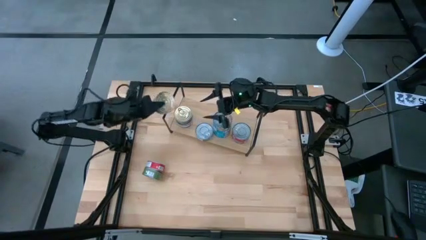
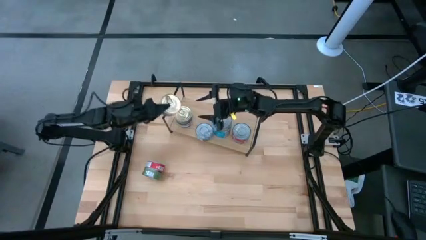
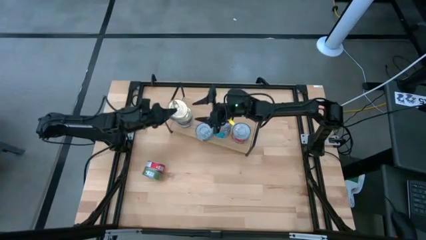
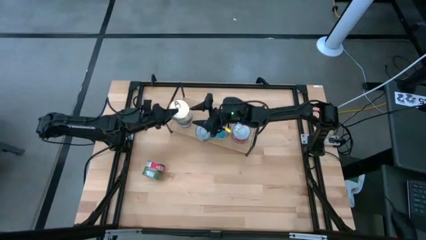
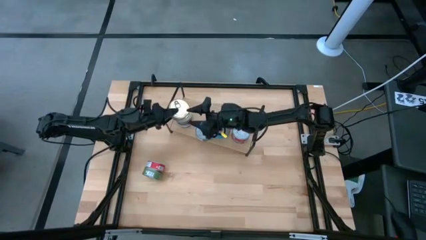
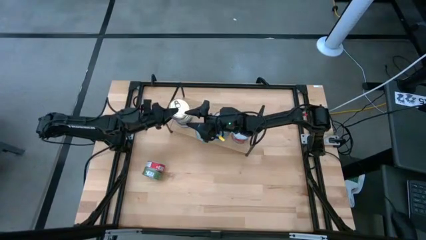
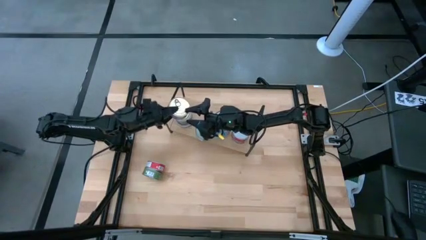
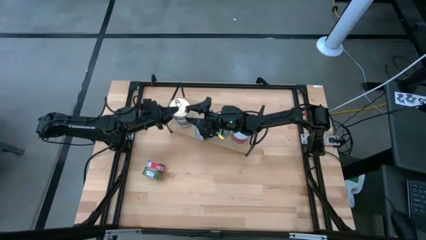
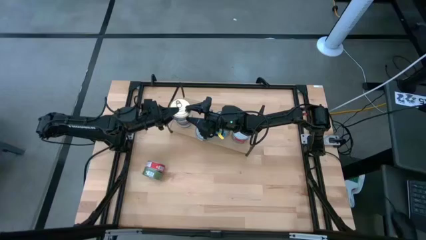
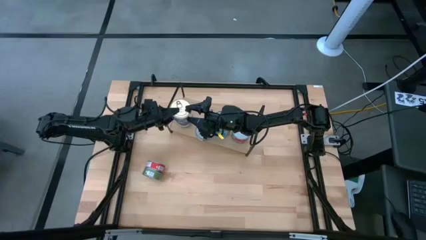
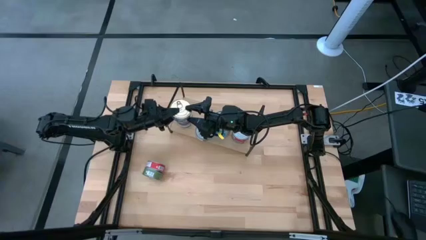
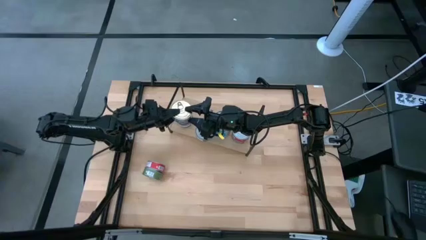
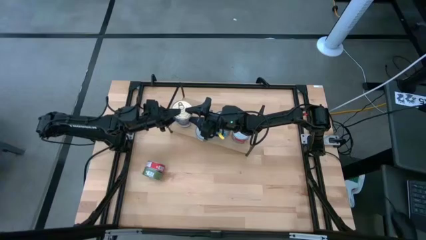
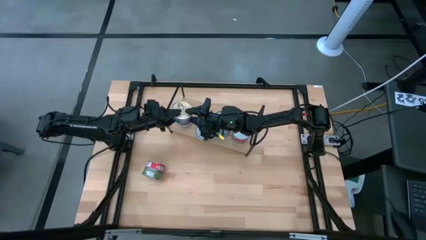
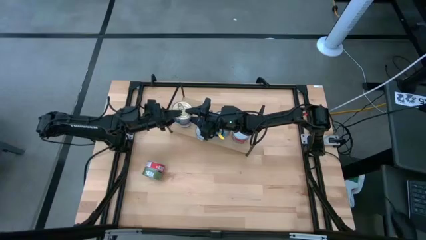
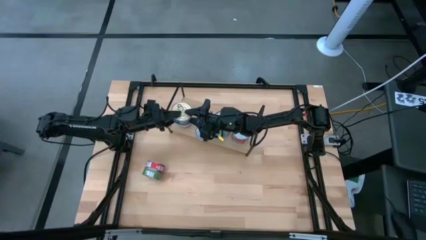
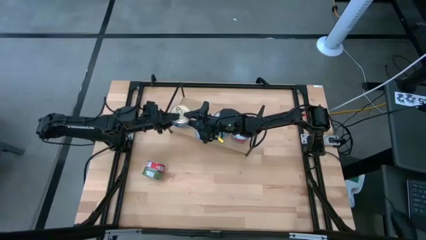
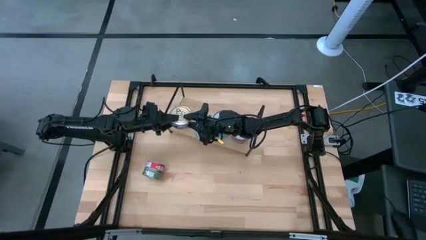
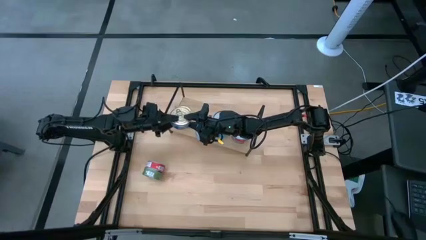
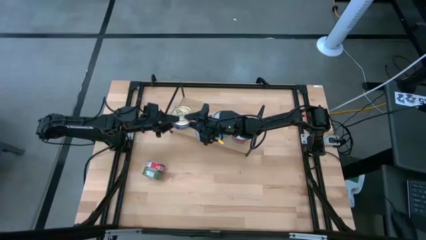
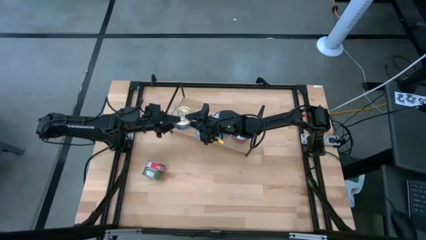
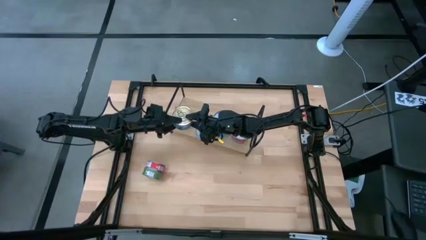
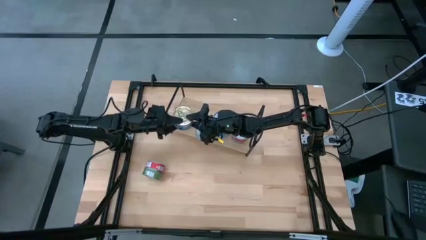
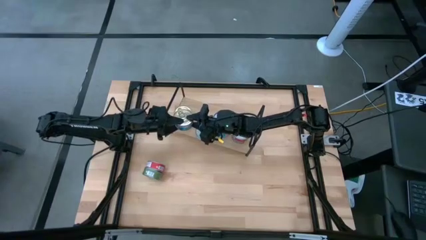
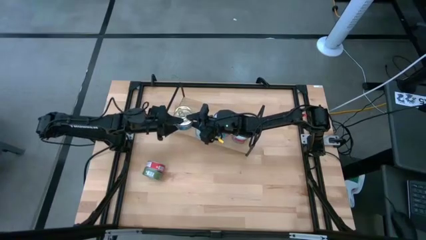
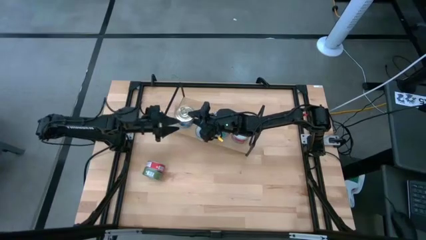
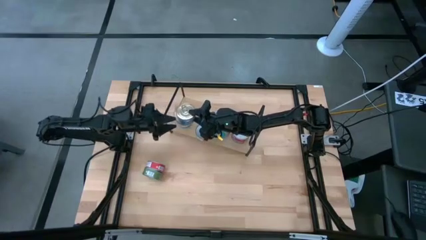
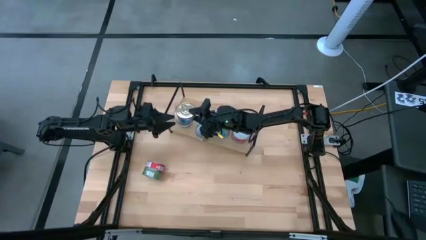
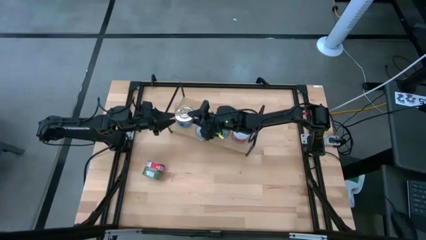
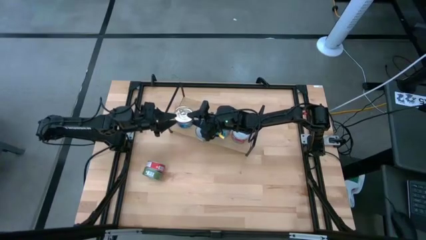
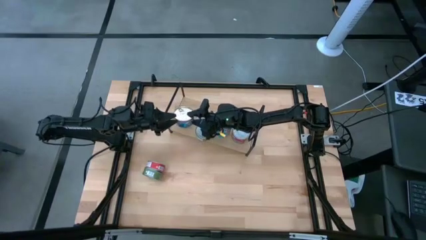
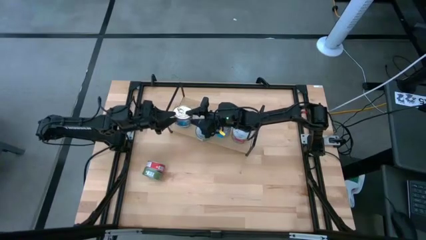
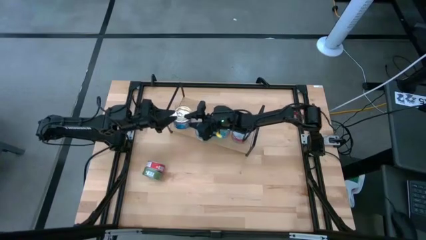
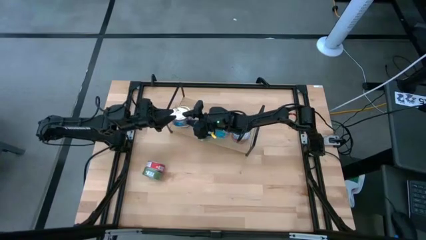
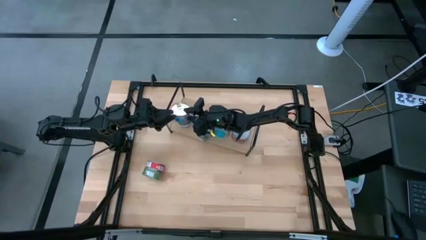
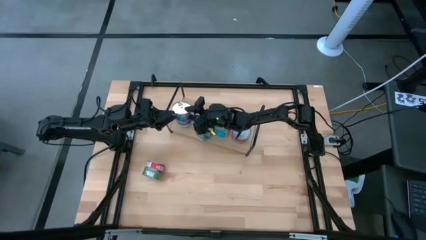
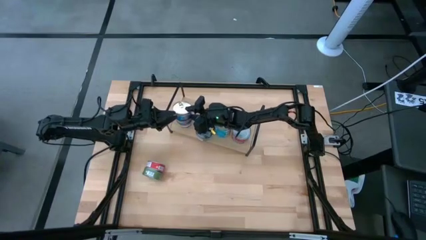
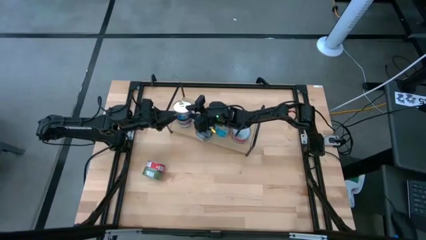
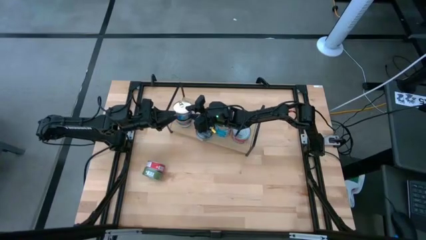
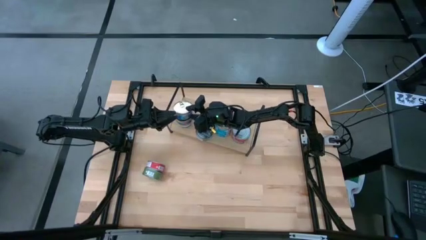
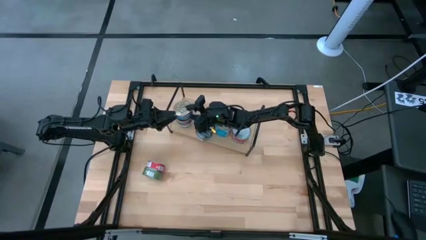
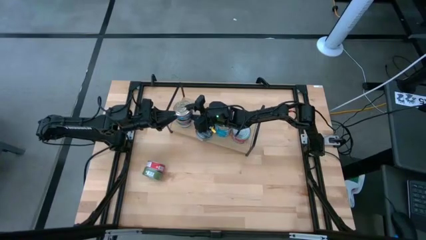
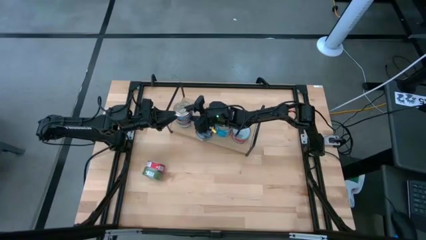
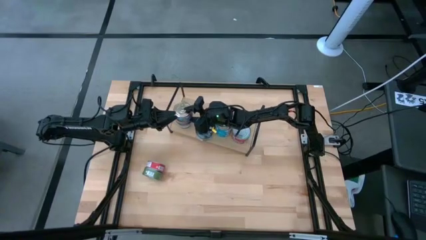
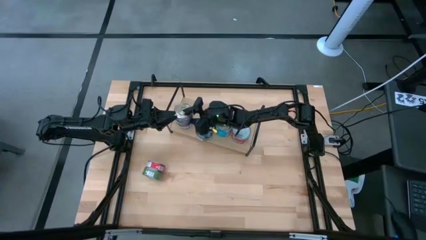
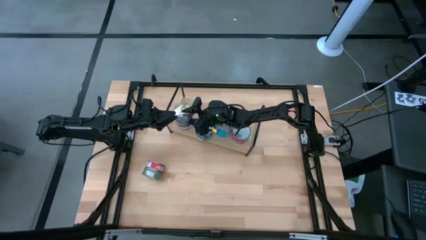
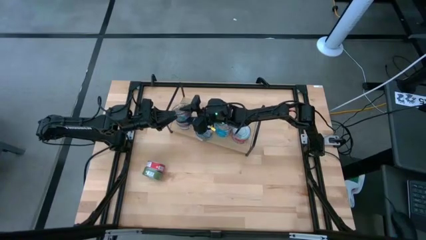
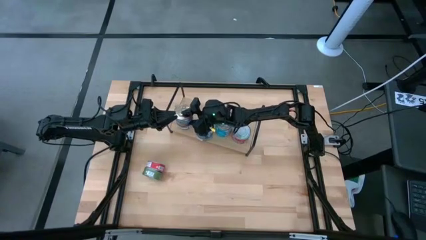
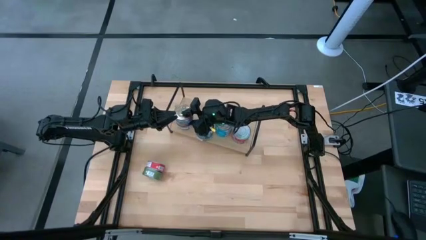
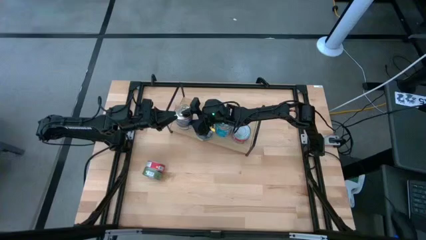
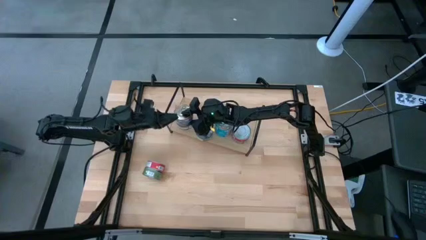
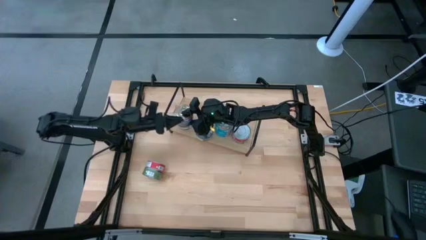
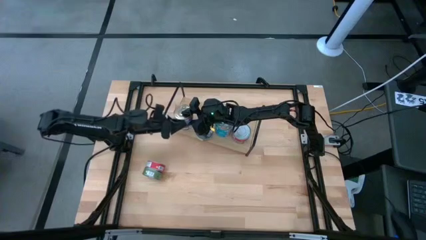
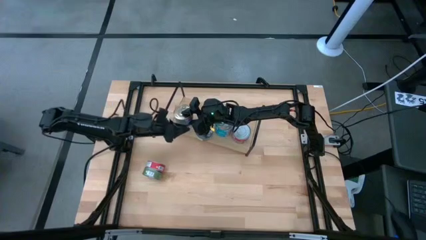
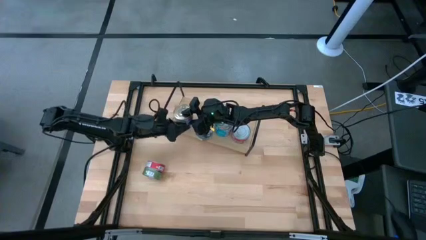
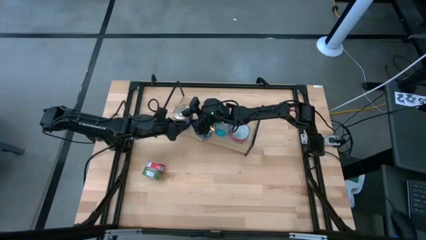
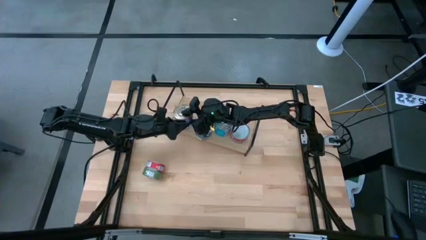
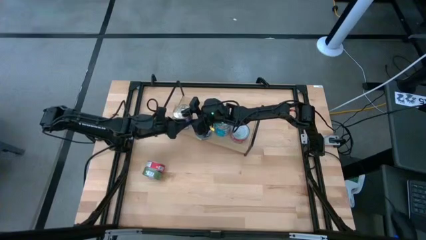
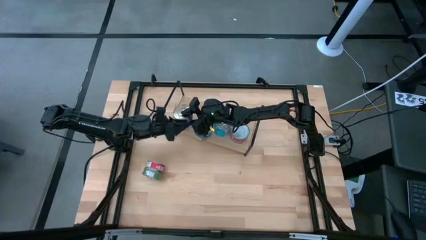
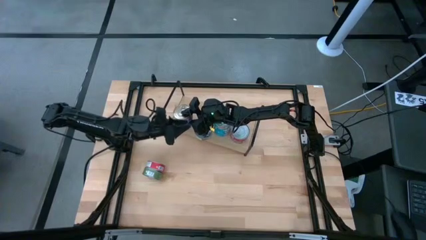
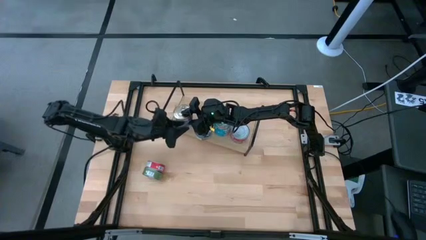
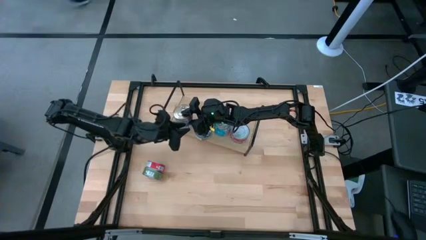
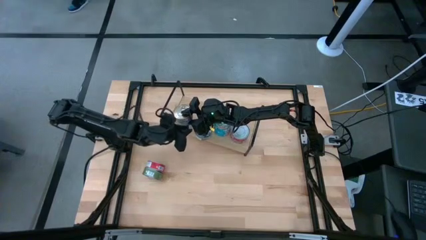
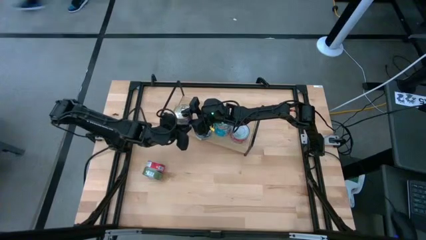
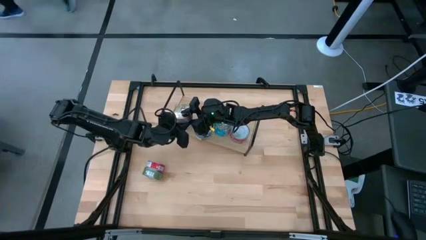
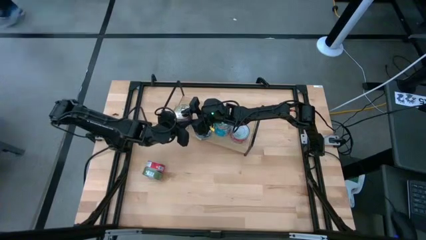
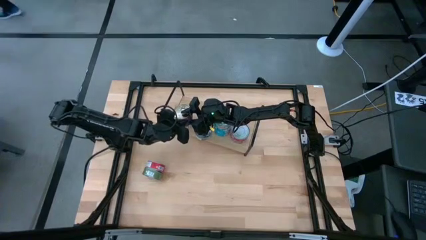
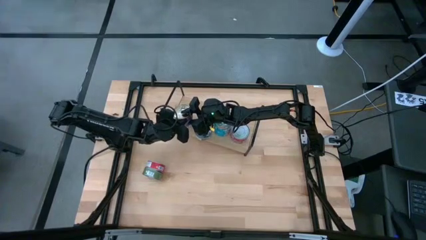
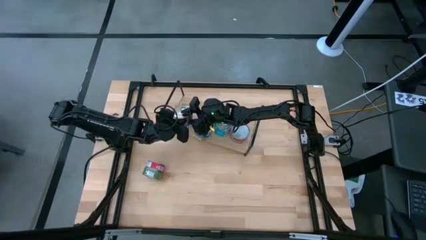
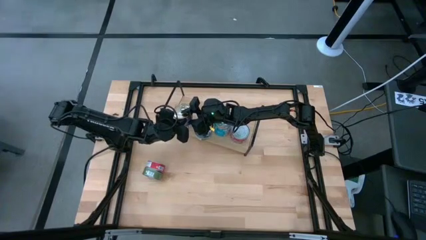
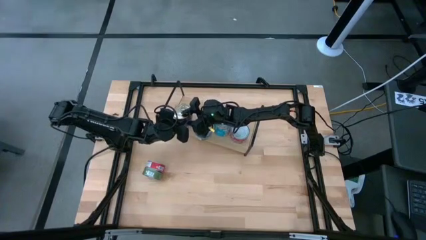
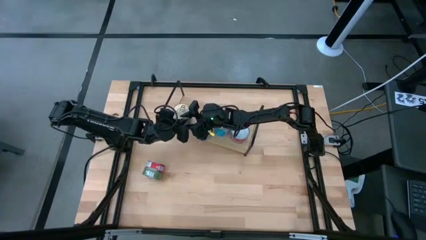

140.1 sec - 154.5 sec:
Task: Stack canned seafood by type on shelf
Stack the blue-pink tuna can on top of the blue-pink tuna can on the shelf

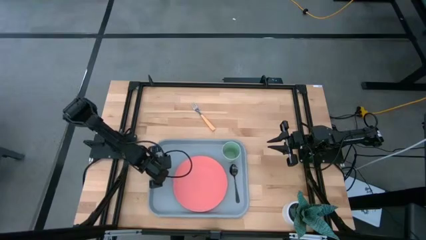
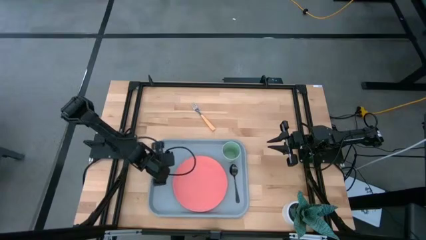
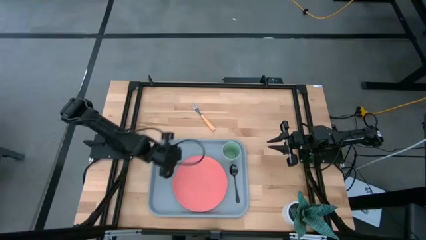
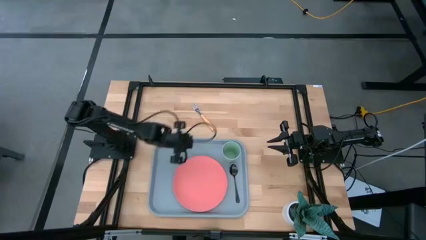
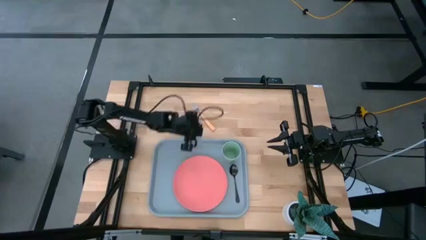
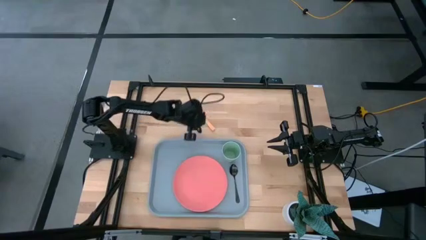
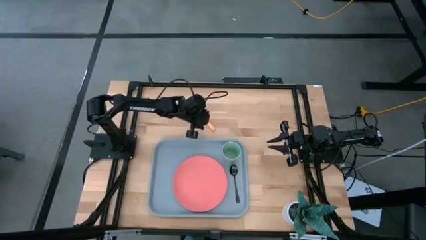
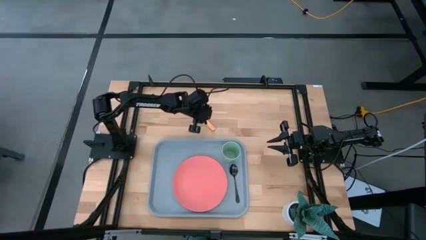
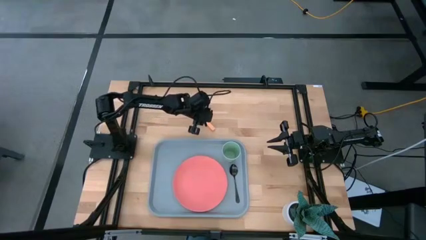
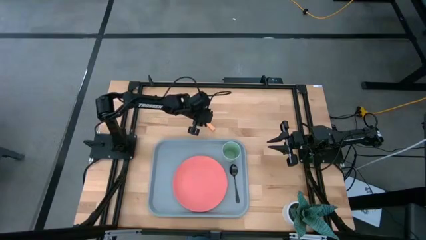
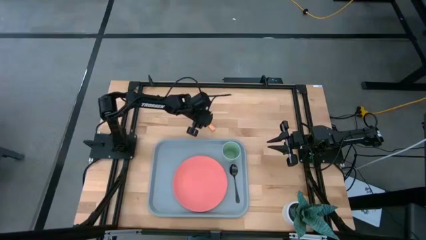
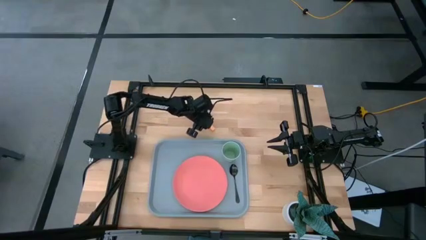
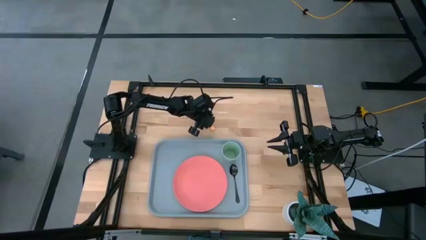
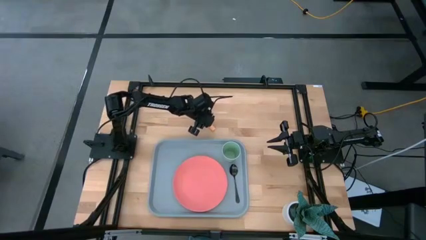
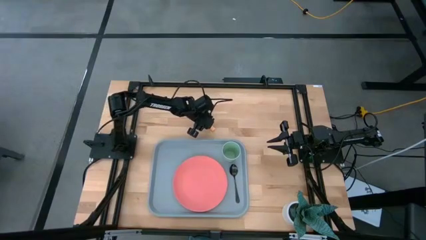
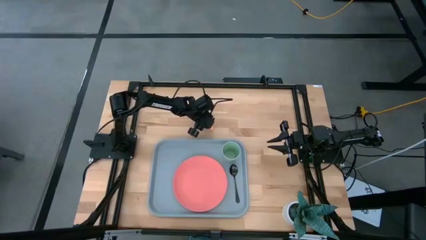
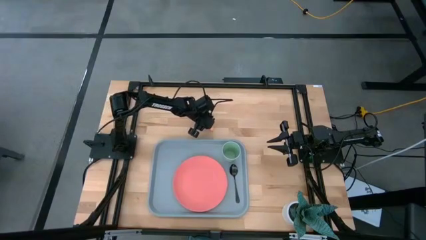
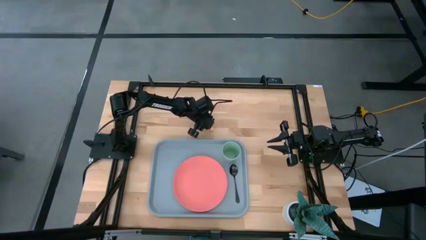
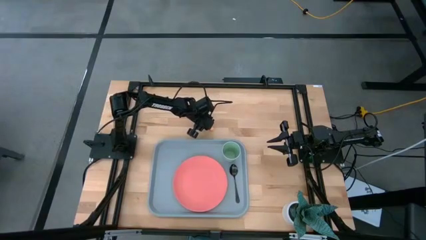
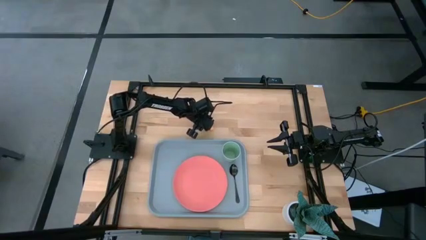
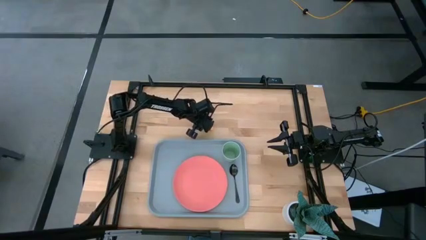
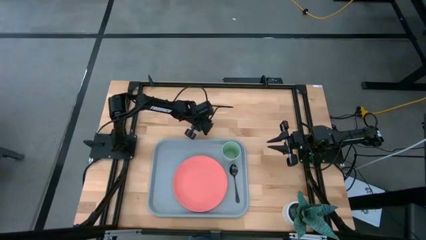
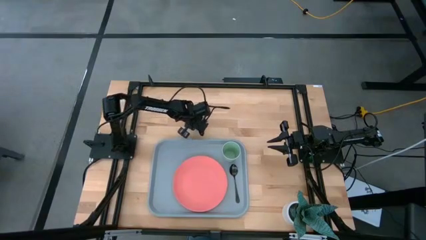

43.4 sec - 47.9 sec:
Task: Pick and place plate/cup/fork/spoon on tray
Put the orange fork on the gray serving tray to the left of the pink plate
